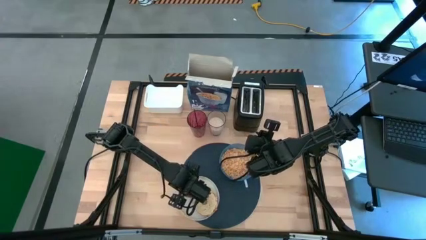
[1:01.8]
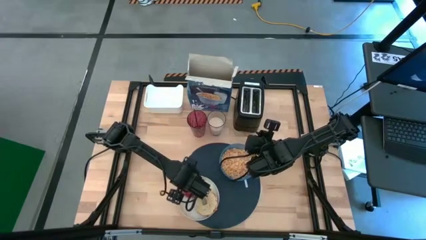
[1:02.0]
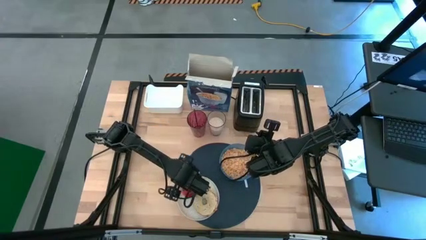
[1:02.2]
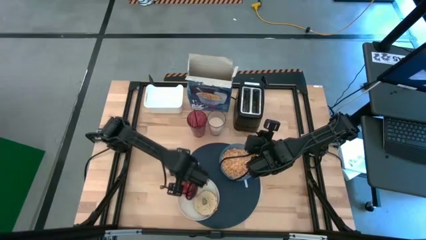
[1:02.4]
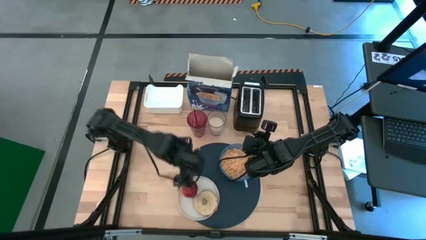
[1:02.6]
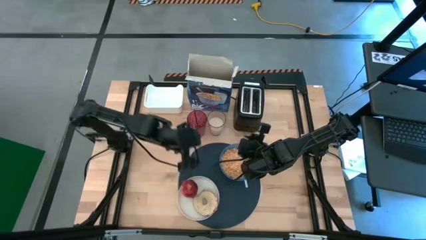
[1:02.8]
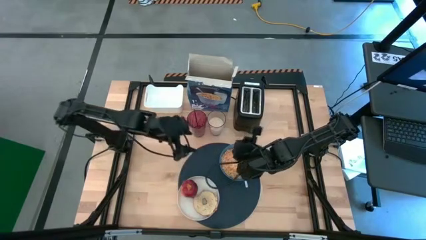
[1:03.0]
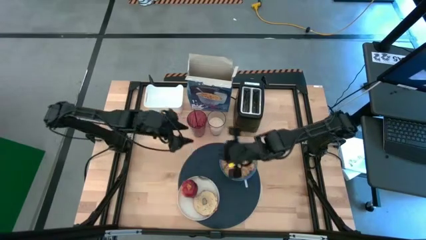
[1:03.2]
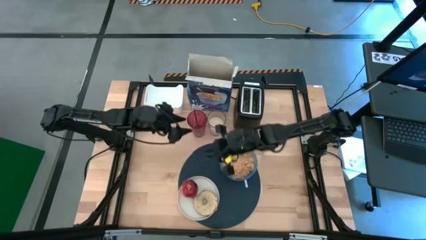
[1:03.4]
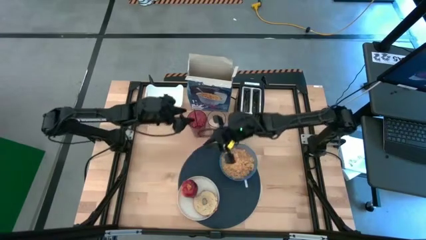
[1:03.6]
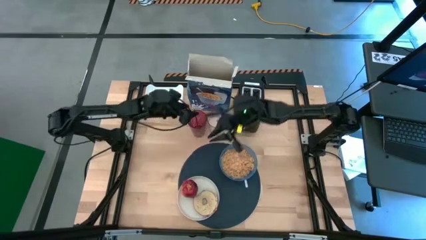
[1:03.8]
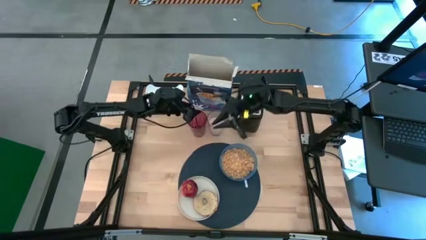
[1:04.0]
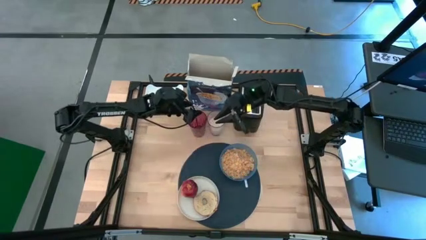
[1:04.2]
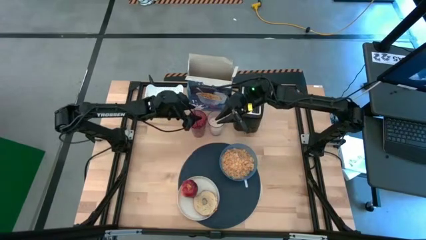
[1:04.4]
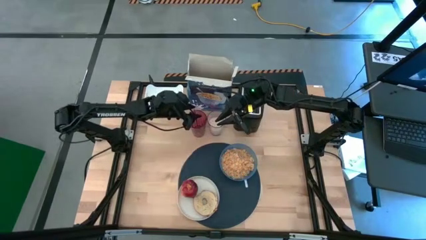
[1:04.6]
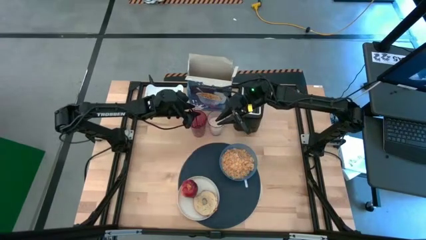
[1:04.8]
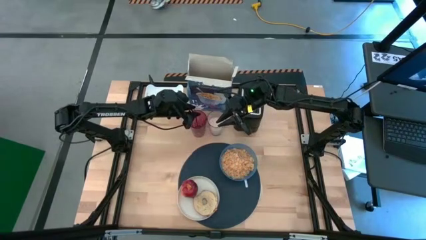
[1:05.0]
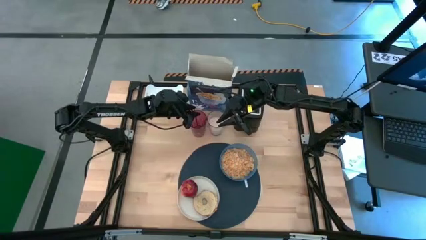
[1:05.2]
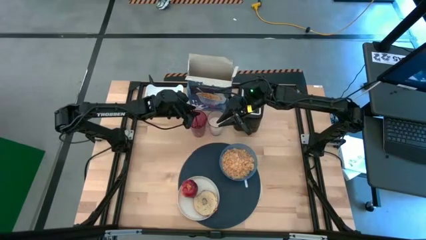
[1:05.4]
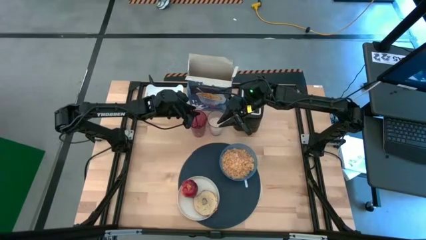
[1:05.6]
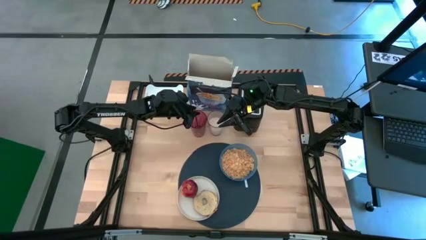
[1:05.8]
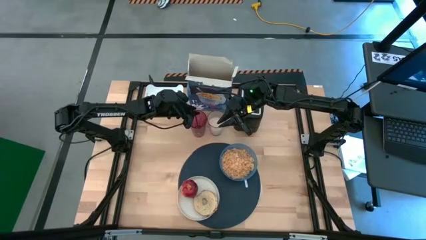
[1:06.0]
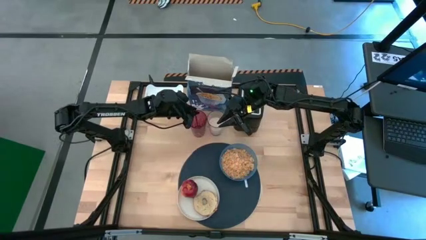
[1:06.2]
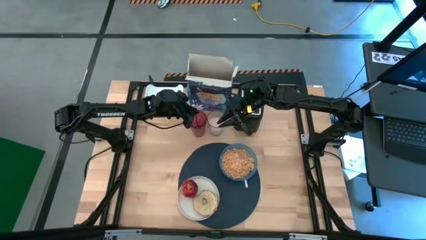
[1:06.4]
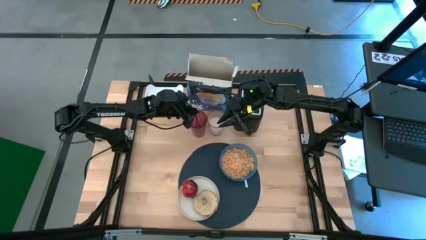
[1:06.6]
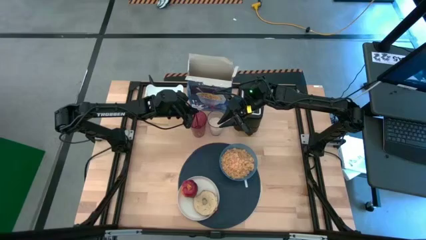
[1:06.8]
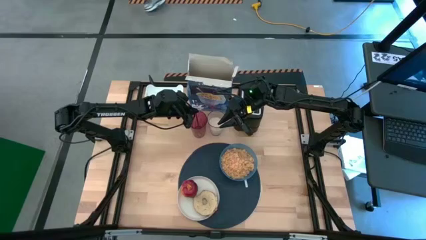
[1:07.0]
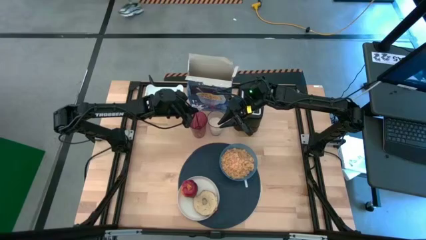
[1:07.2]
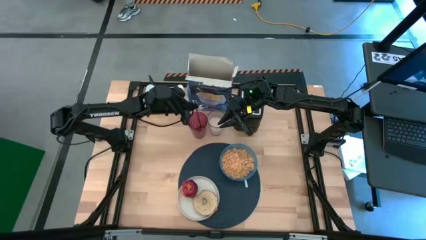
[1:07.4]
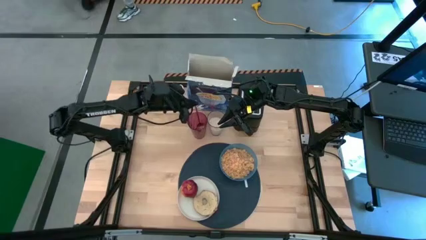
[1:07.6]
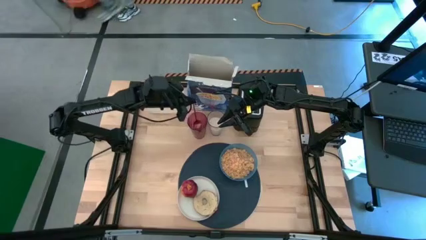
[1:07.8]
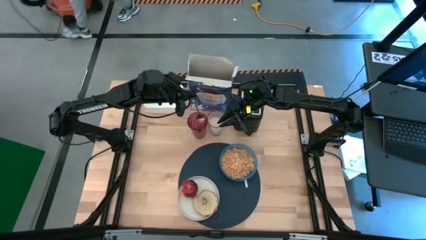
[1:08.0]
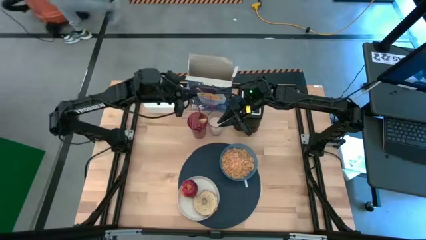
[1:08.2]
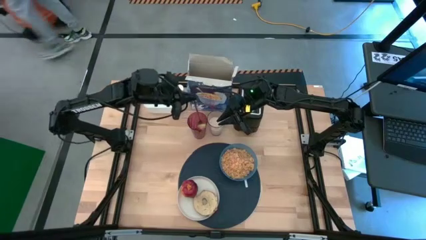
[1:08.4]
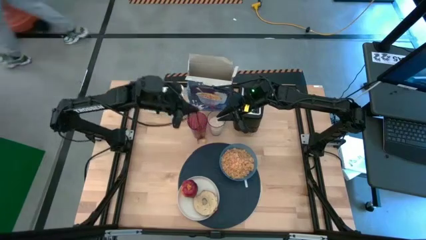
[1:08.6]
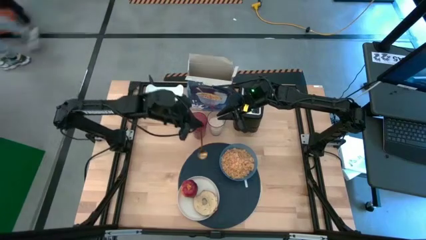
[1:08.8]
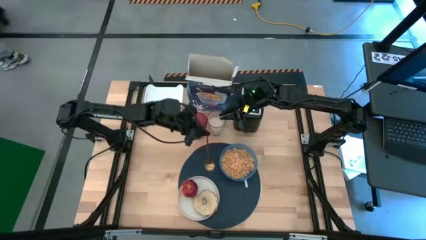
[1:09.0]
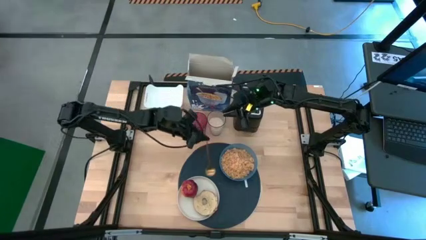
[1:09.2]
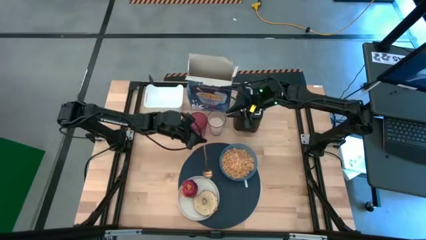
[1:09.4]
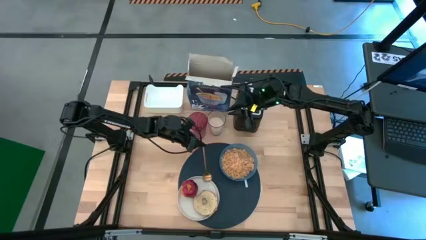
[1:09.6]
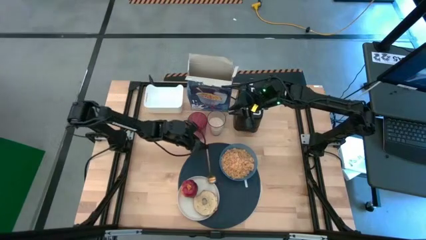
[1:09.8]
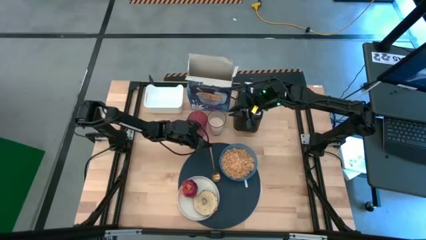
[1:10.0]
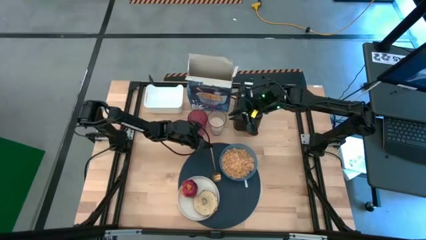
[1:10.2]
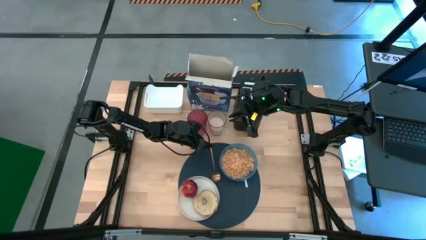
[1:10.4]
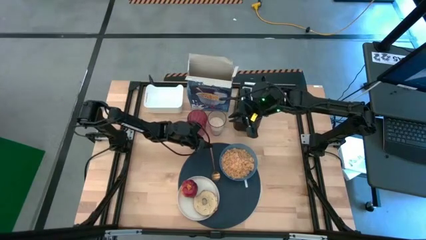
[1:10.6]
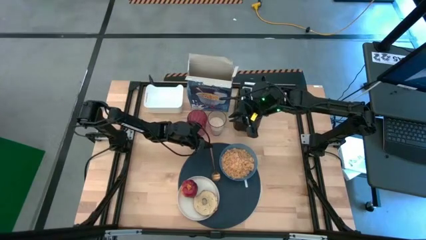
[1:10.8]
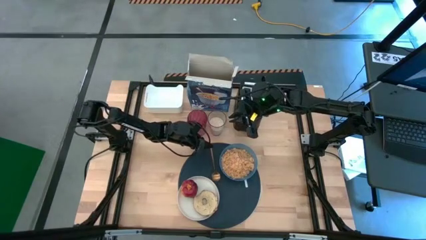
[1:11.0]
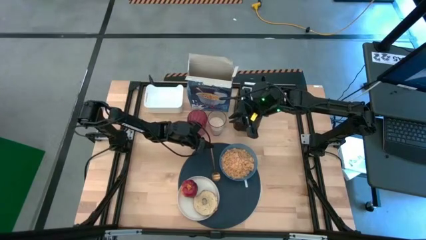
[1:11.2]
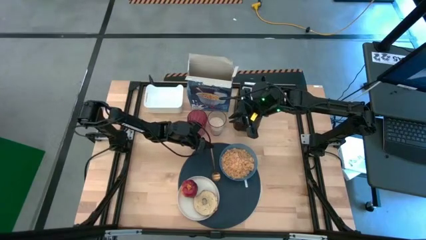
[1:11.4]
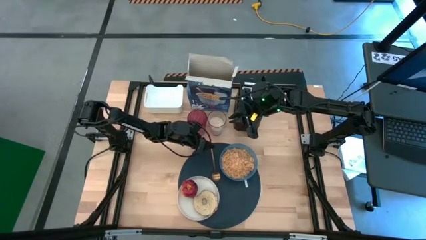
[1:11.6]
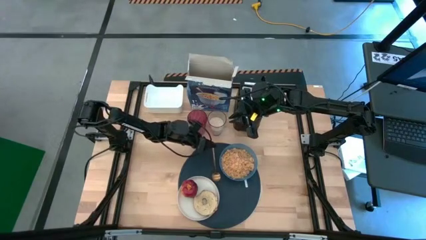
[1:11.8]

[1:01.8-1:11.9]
Task: Arrange a breakfast setting
Put the gold spoon beside the blue bowl on the dark blue table mat

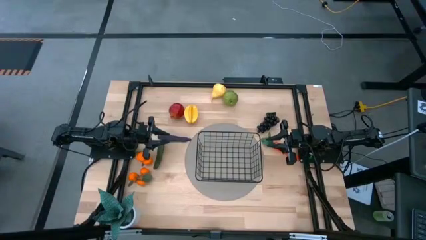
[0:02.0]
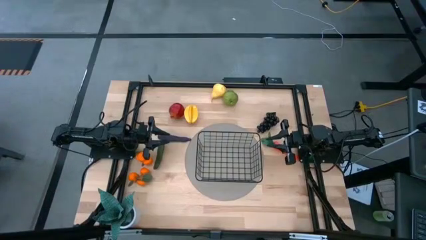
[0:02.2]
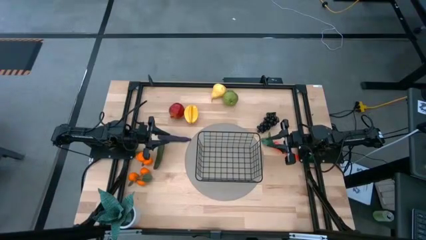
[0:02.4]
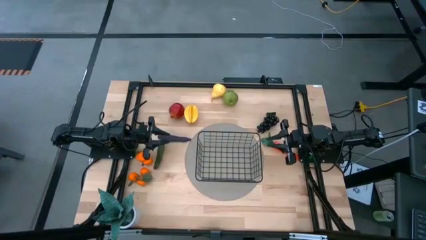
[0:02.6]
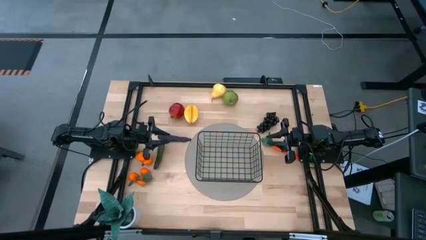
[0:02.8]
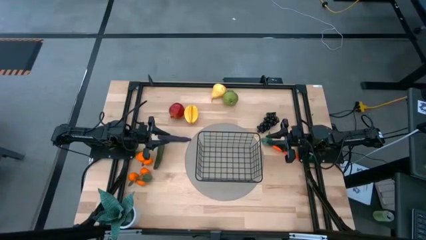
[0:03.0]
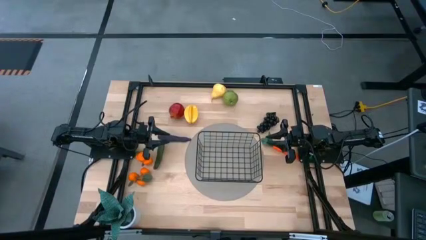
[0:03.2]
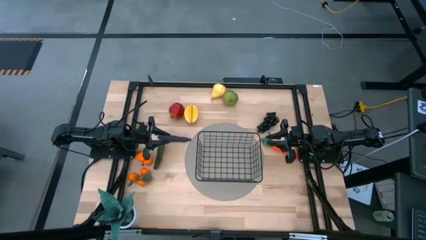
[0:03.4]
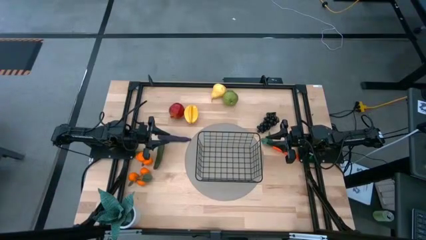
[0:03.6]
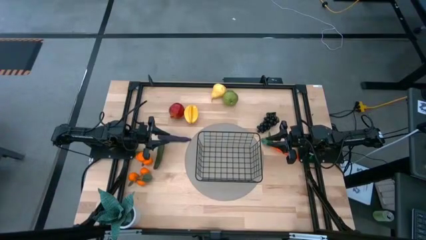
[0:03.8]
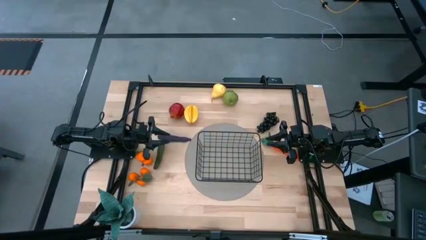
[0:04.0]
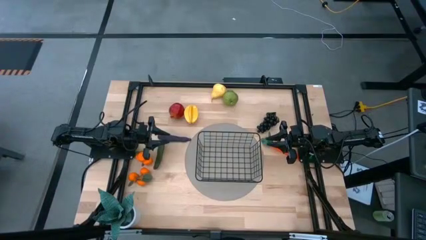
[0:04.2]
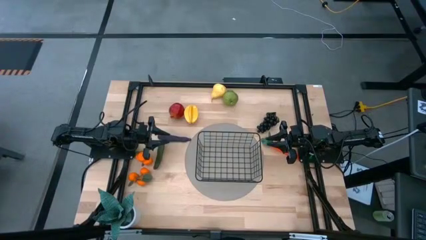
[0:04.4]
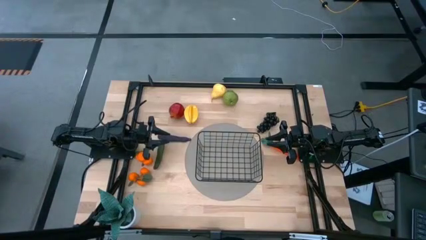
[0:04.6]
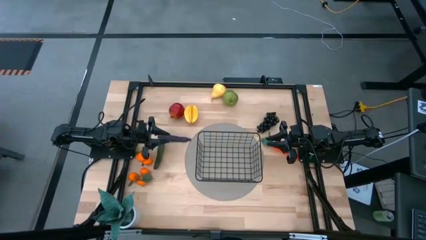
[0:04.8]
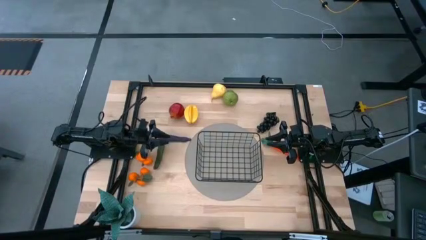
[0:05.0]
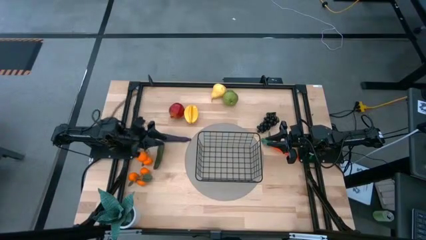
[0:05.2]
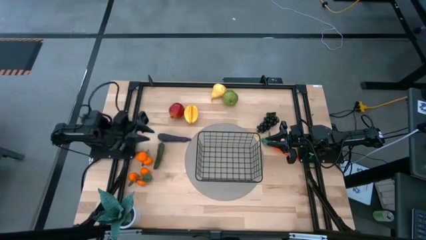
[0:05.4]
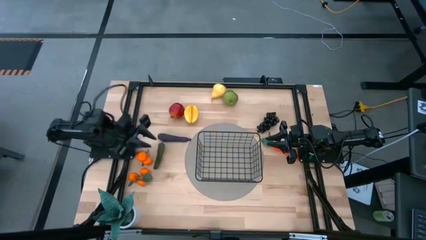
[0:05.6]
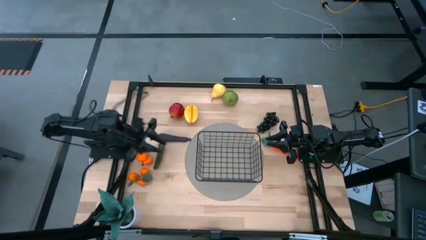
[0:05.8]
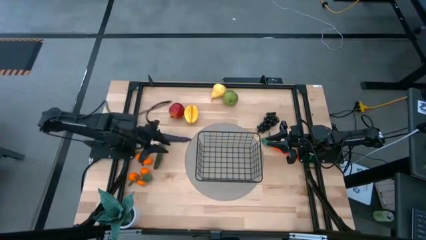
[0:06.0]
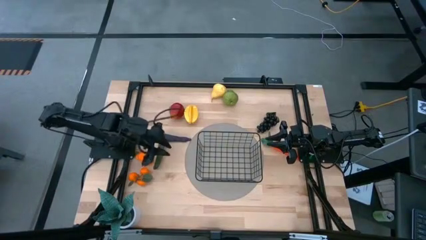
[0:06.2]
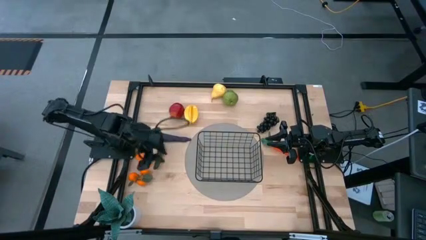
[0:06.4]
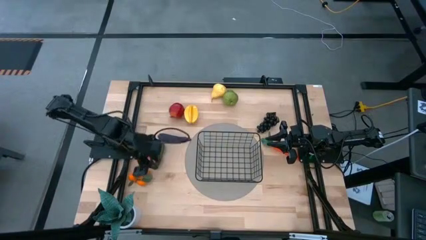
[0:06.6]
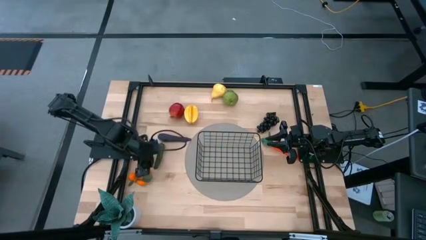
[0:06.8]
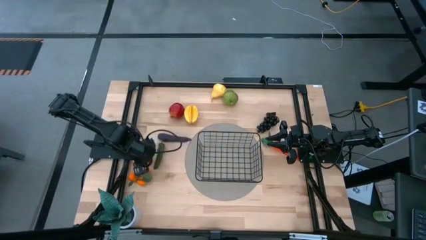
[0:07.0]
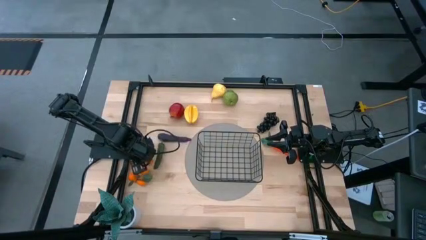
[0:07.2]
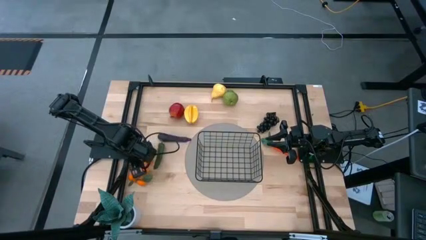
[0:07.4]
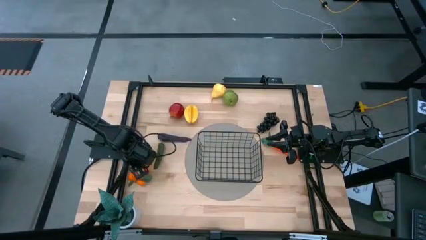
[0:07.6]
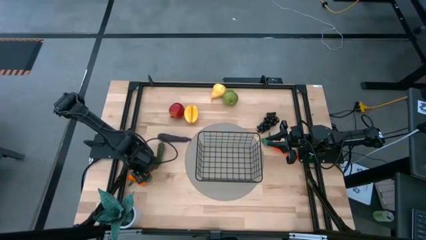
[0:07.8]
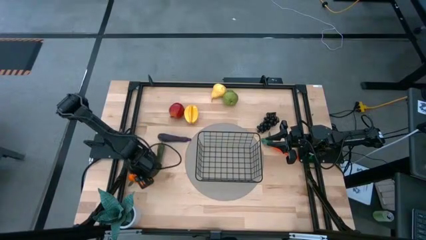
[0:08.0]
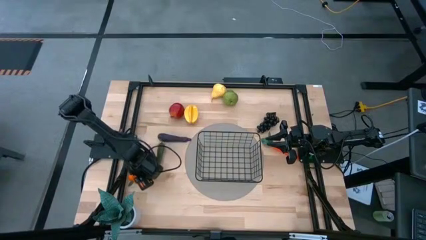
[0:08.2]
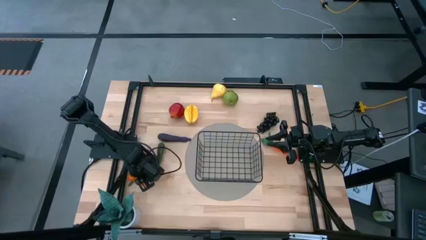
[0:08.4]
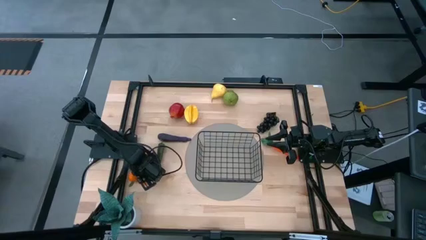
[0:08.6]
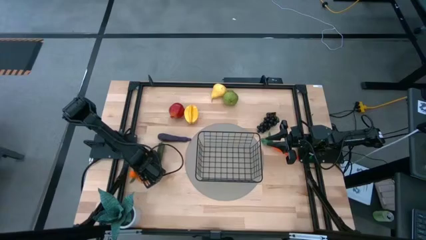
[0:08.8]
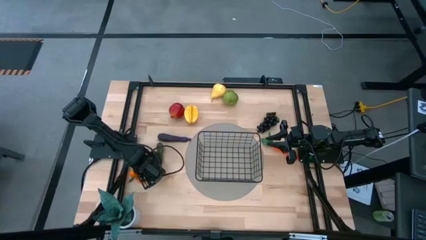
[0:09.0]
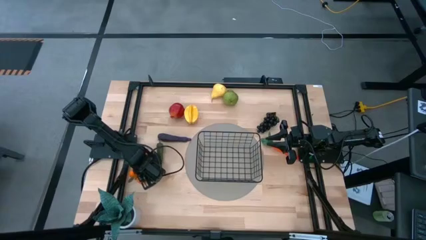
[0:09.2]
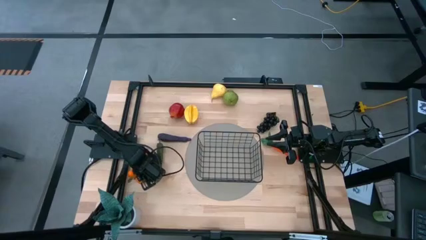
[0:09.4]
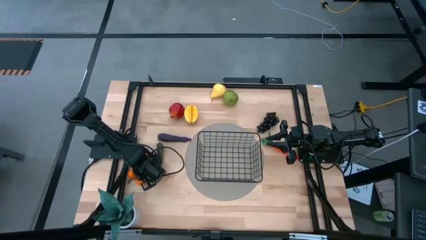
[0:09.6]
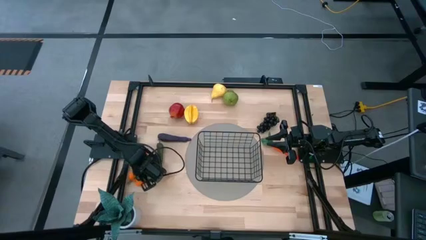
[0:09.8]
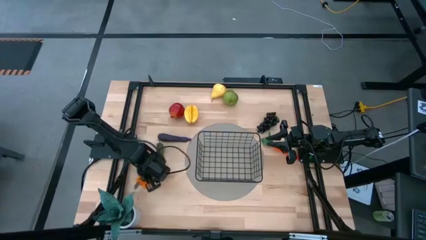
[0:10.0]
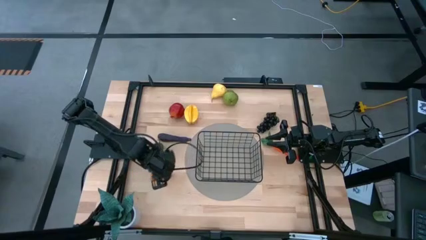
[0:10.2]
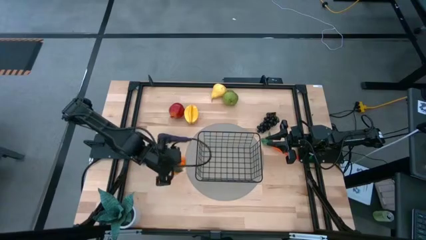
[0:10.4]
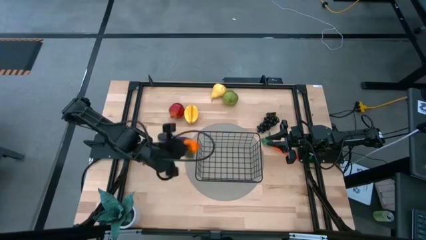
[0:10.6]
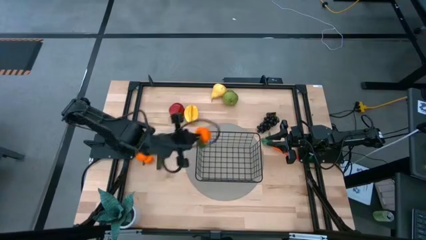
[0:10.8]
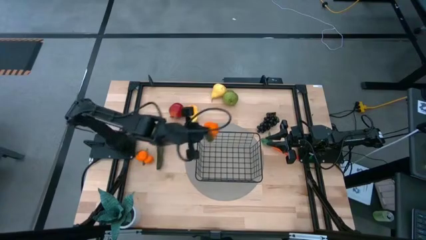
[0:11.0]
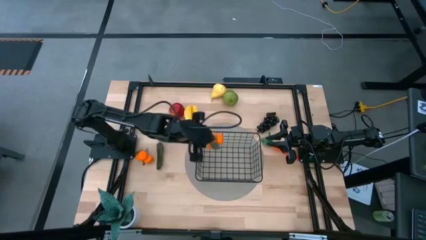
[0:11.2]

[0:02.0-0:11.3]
Task: Build produce basket
Put the bottom tangerines into the wire basket
